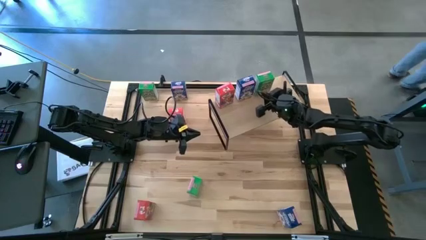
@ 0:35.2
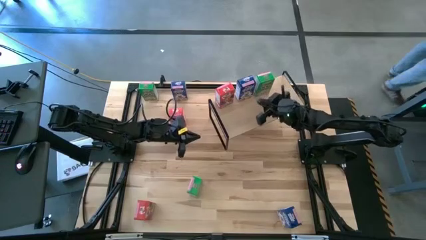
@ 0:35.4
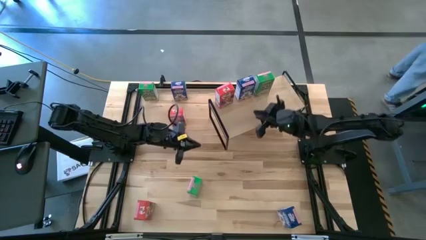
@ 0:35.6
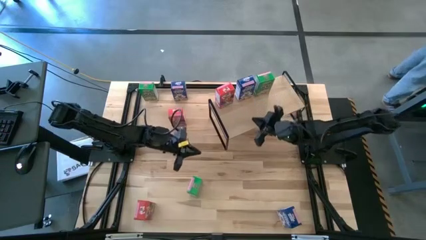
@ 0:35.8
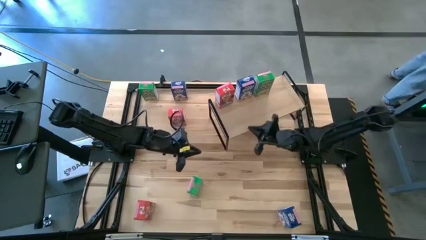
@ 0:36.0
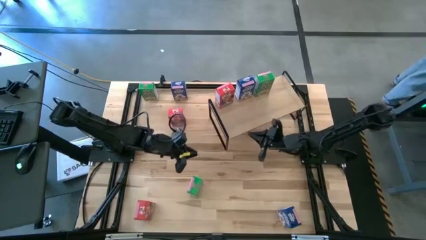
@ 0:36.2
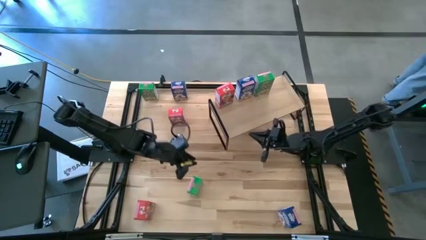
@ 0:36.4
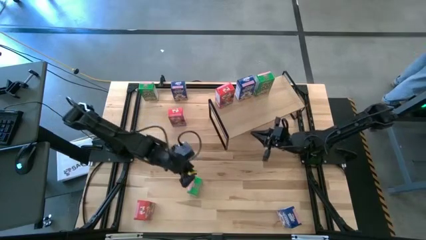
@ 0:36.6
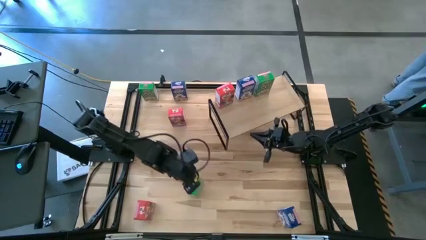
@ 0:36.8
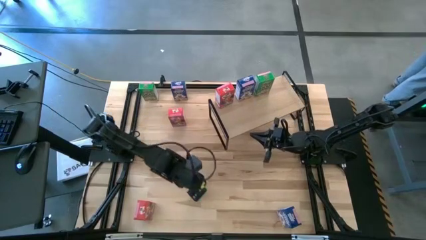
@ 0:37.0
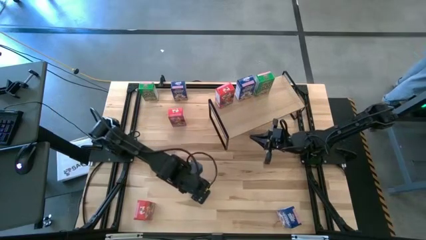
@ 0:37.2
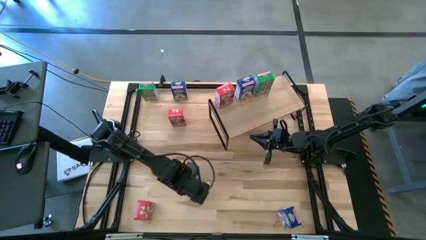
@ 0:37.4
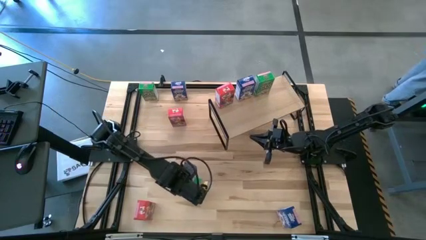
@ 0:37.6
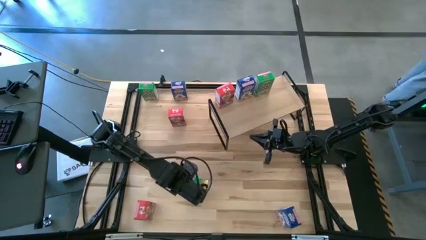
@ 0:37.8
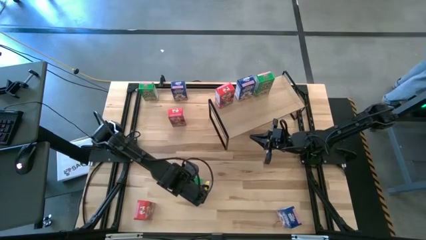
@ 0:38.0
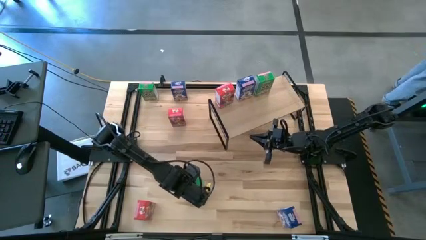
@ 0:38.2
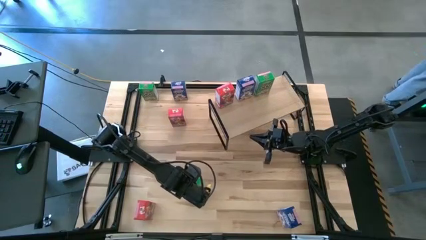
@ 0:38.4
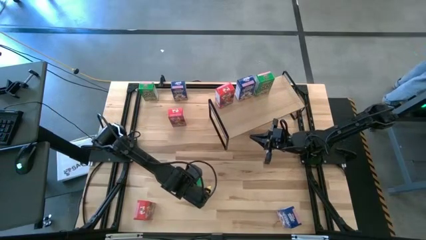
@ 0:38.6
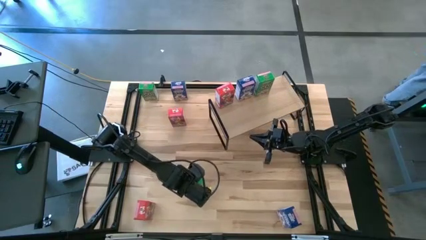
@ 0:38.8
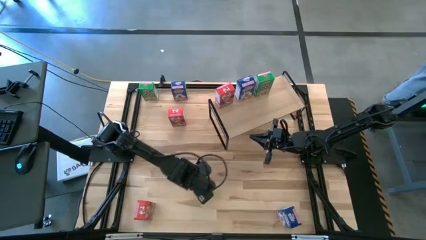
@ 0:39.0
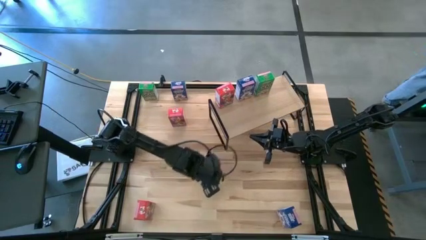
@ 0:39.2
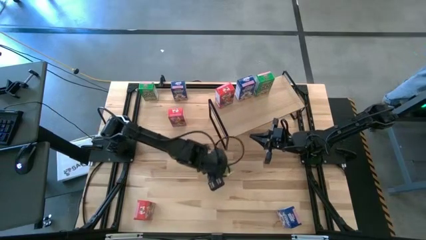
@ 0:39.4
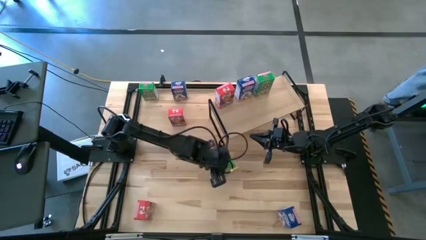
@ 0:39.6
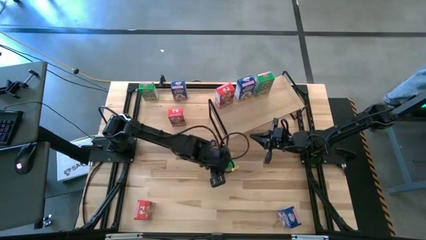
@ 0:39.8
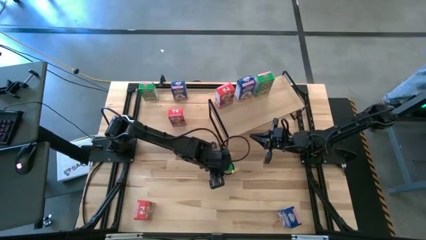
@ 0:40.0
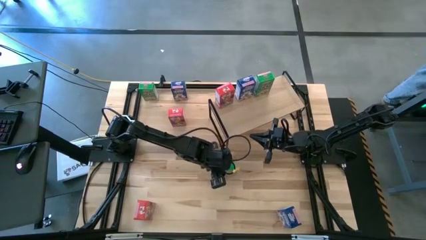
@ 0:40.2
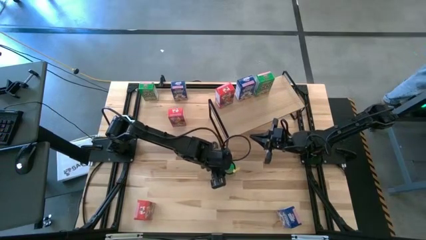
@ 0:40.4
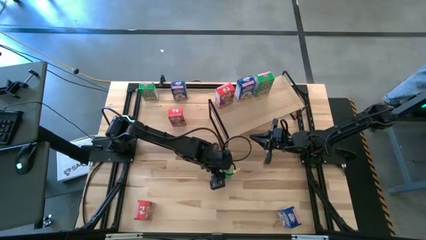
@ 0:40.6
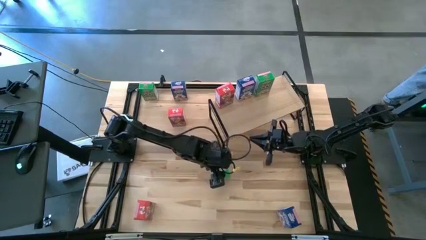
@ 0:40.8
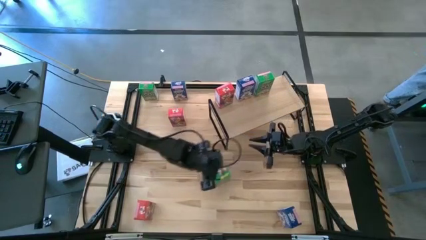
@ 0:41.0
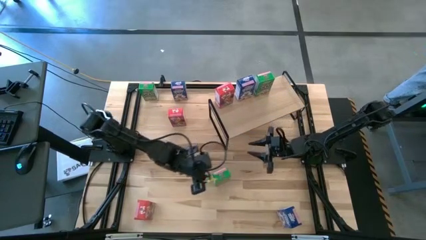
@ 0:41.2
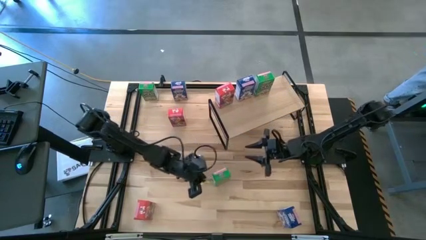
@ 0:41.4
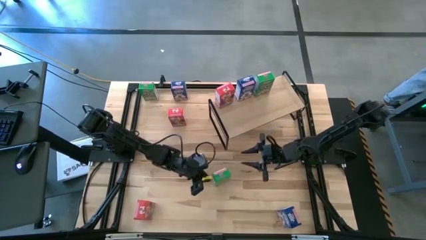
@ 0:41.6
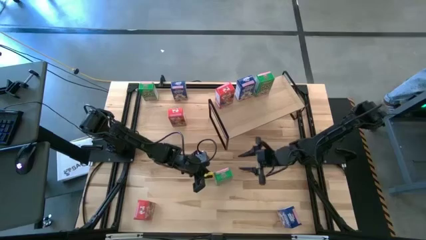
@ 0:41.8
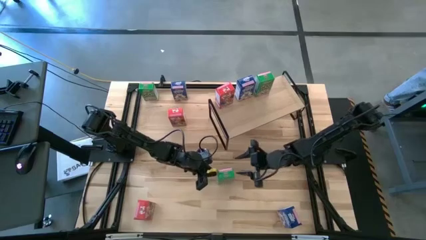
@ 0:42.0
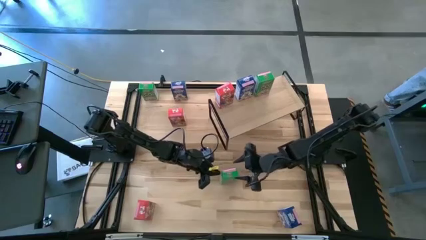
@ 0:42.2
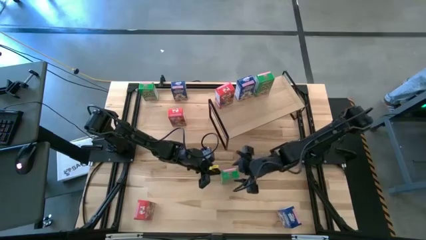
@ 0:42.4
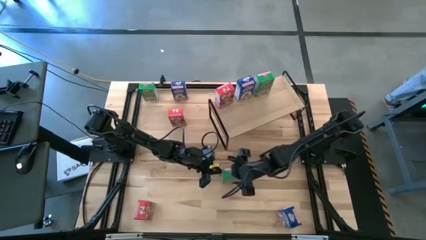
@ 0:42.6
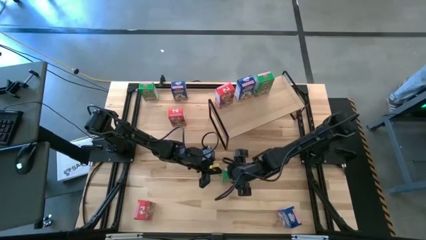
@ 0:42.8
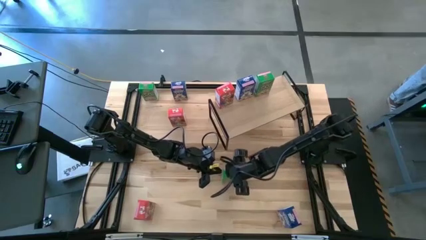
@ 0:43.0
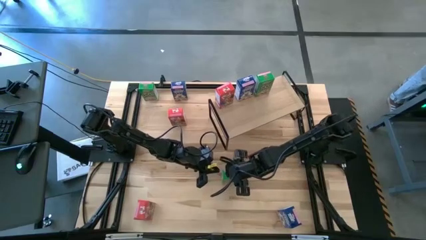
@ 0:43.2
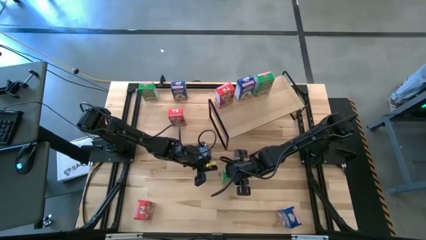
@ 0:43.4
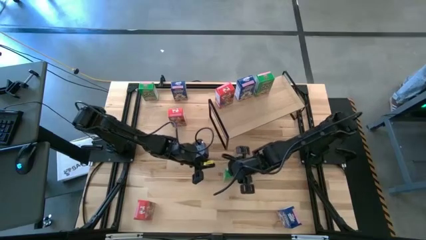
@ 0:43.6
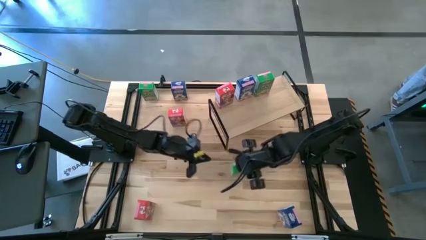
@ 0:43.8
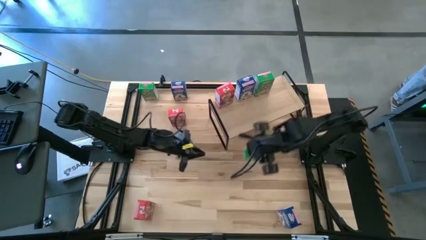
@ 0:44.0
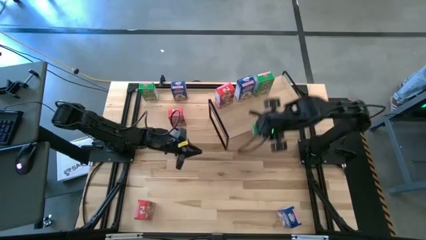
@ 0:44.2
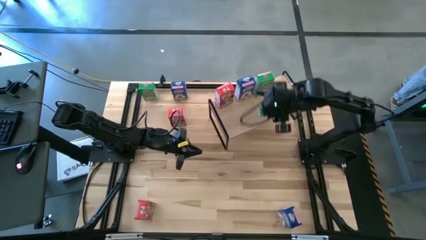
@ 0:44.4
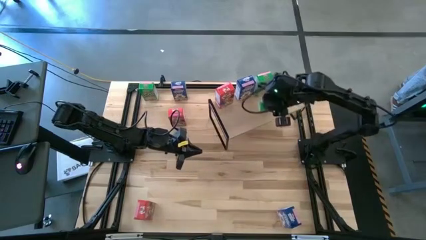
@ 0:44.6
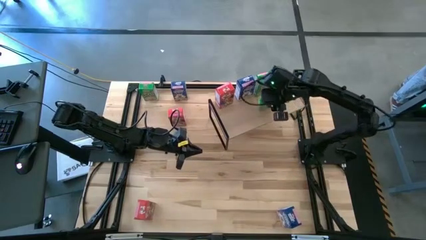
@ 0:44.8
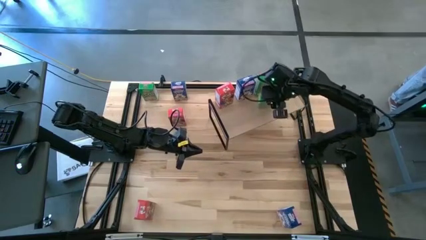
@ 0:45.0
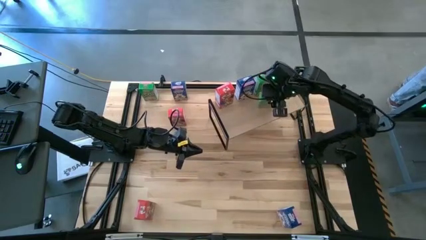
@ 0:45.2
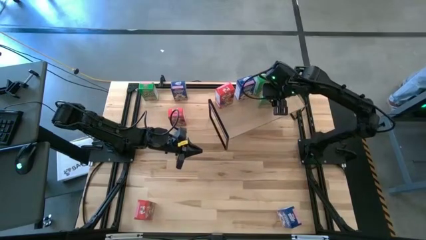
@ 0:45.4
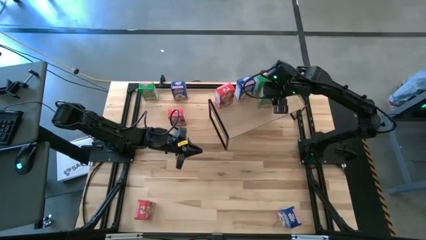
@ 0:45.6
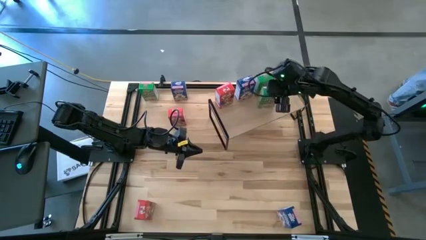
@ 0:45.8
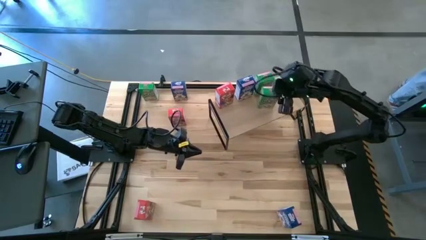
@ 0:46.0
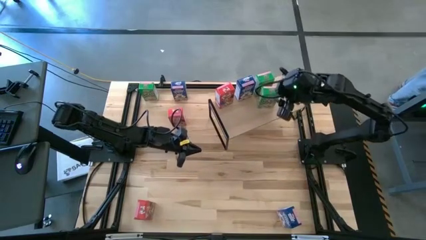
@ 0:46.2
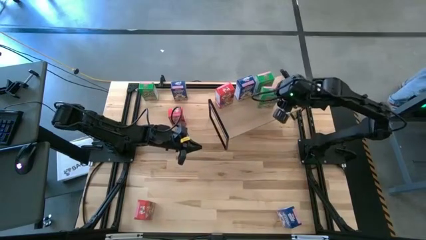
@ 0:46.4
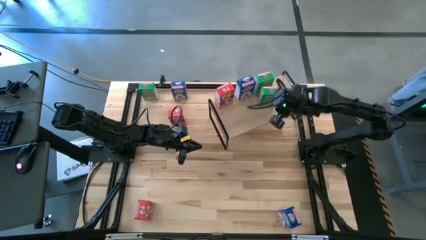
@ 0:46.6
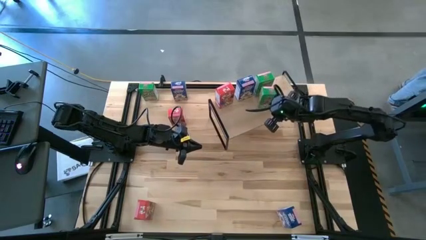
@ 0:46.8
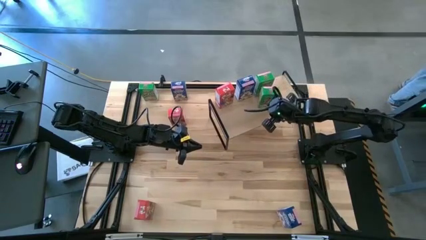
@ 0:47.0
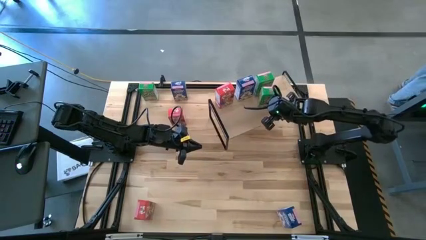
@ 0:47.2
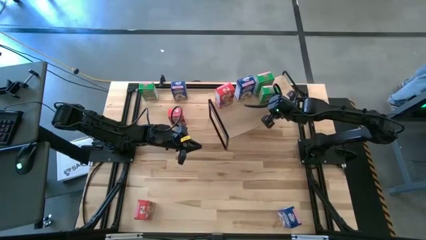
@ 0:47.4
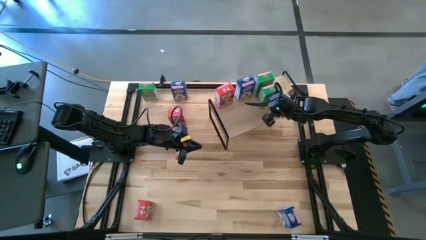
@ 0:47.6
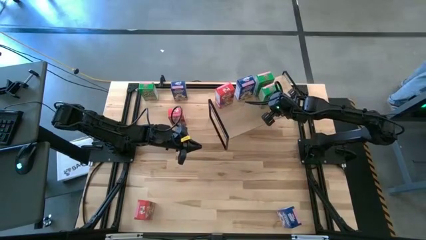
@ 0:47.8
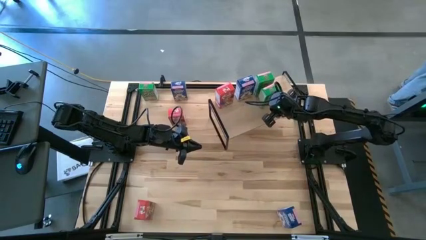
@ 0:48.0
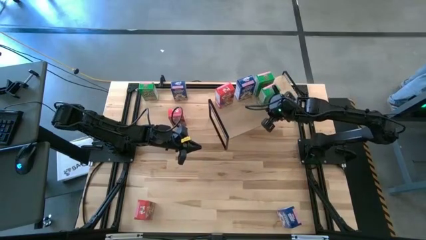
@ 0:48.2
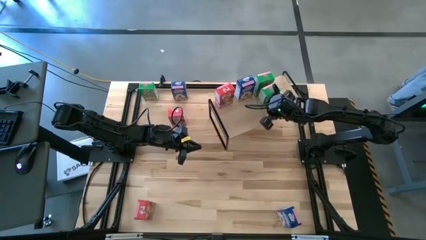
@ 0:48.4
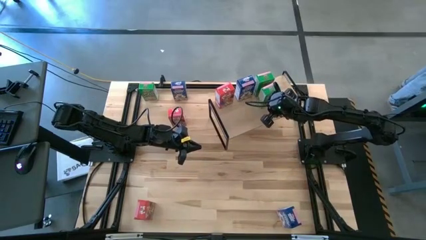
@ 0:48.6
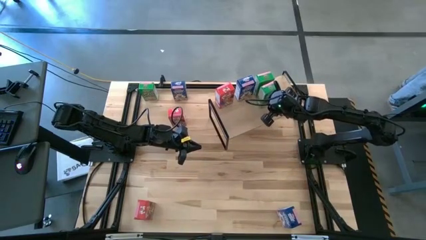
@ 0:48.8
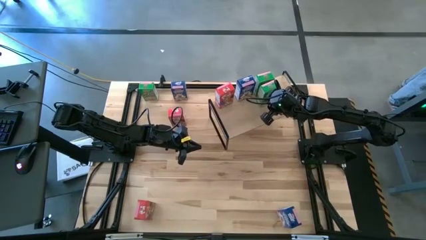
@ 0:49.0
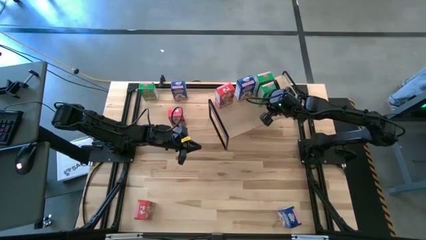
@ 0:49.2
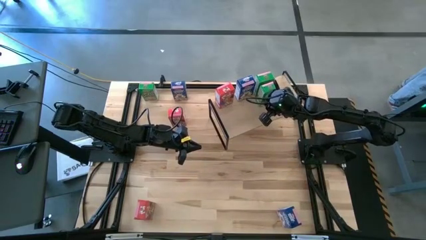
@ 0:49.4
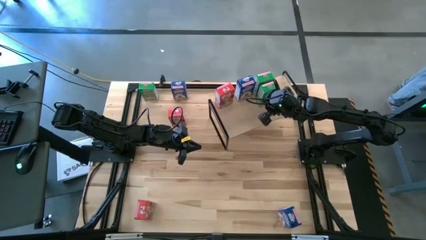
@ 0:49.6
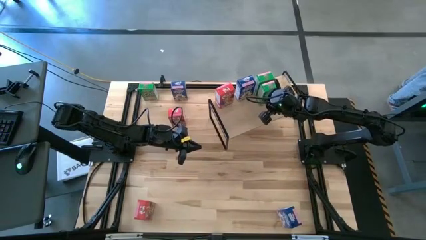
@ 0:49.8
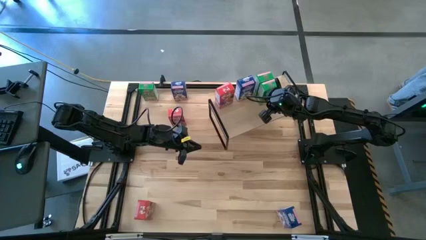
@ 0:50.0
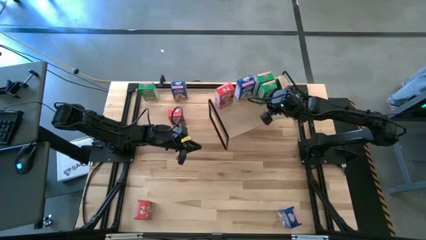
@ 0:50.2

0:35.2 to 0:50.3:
Task: Stack cereal on shelf
Put the bottom green cereal box on the shelf aligned with the green cereal box

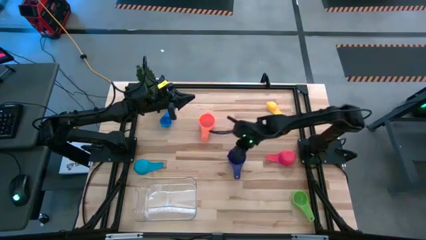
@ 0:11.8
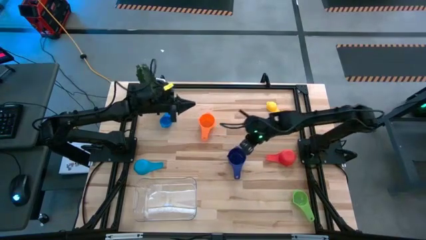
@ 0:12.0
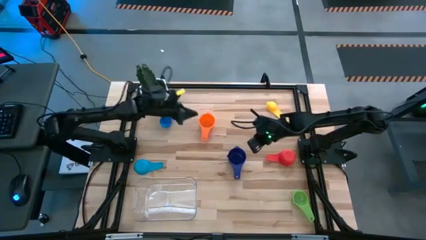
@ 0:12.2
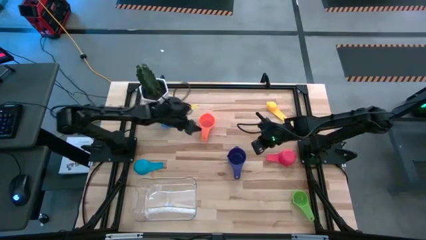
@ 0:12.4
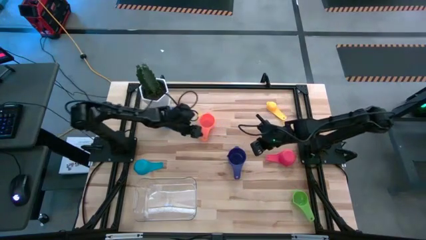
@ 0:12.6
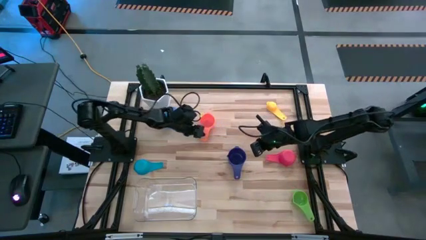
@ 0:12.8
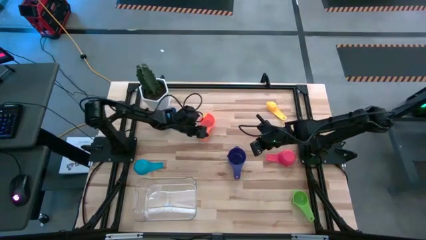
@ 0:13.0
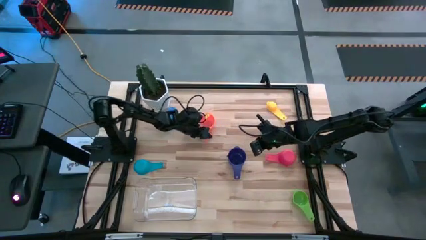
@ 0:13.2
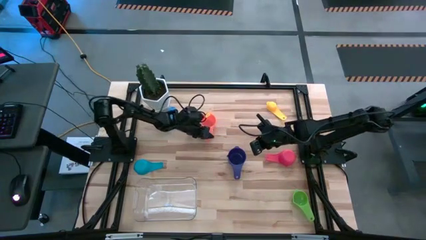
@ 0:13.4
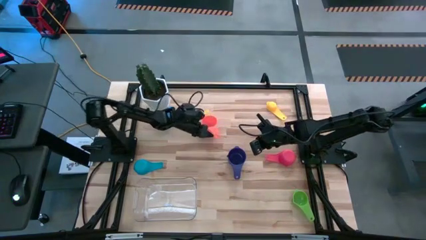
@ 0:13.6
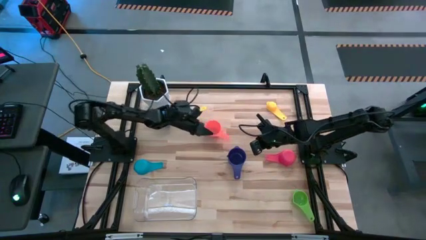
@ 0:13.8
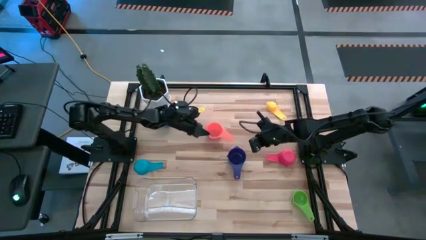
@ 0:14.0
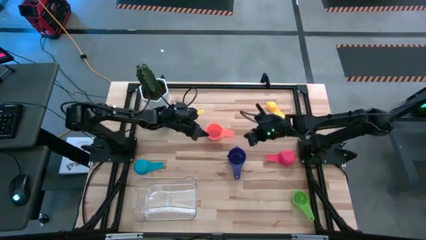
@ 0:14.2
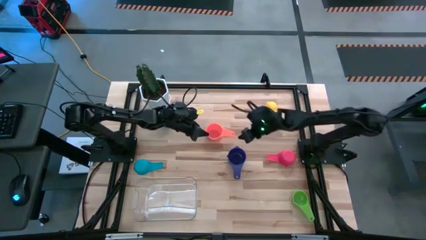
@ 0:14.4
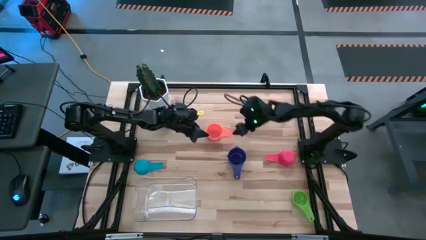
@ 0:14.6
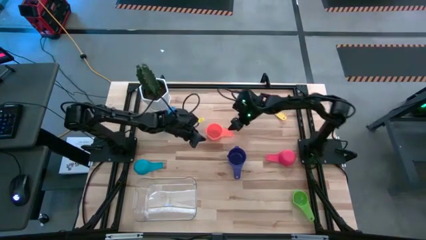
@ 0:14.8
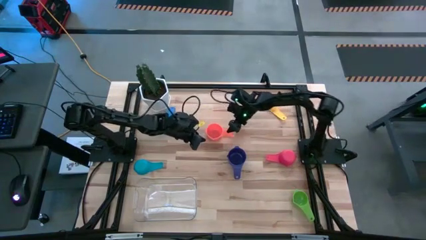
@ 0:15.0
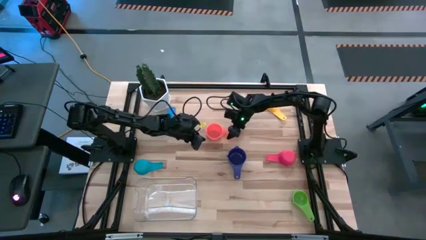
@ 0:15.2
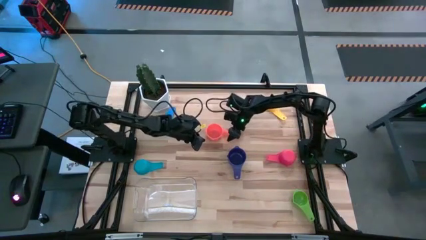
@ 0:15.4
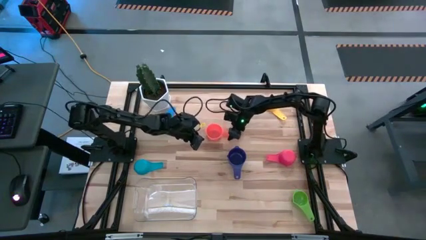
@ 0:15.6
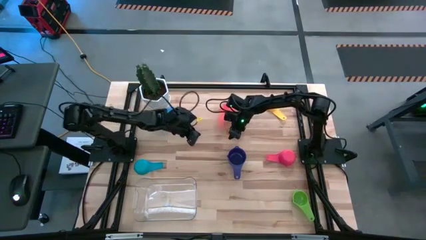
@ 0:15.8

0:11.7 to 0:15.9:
Task: Nest measuring cups in basket
Stack the orange measuring cup on top of the dark blue measuring cup
